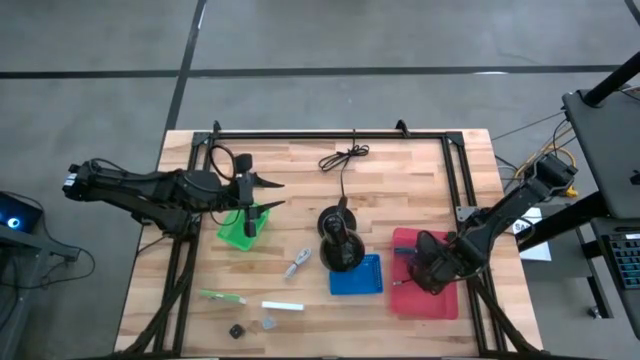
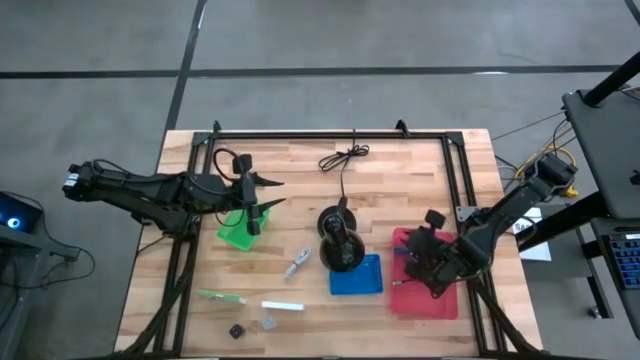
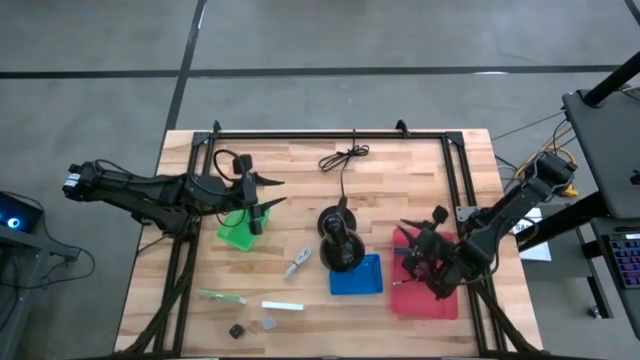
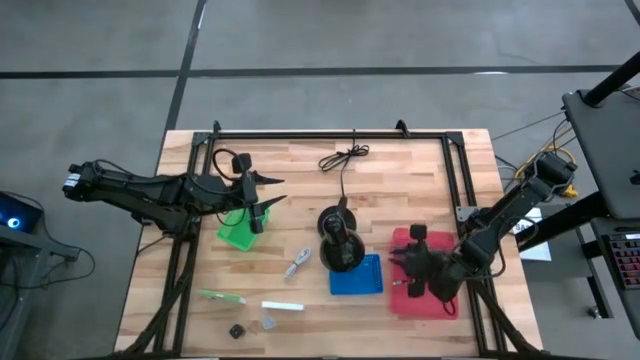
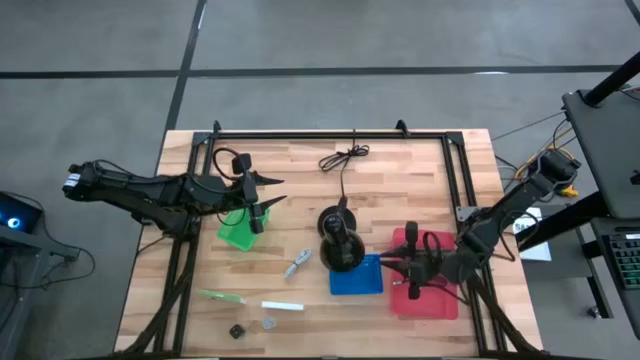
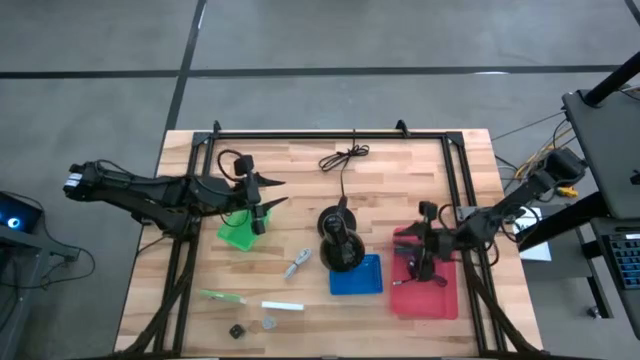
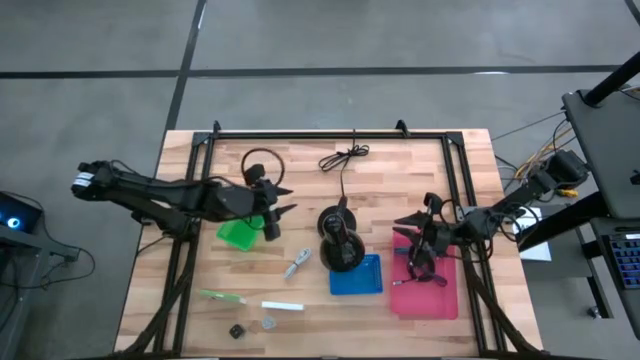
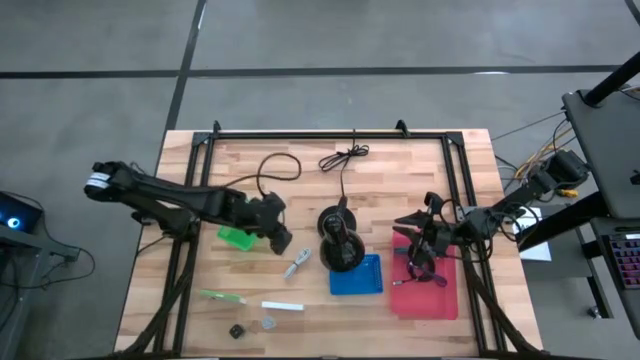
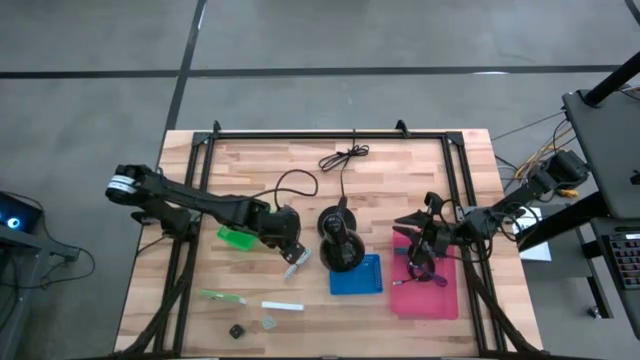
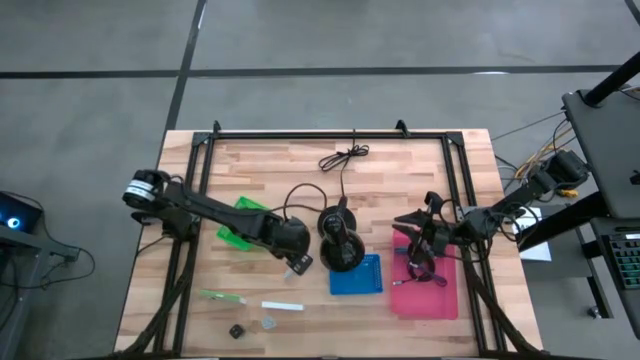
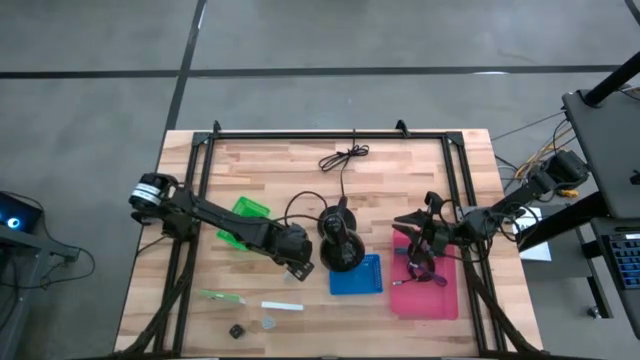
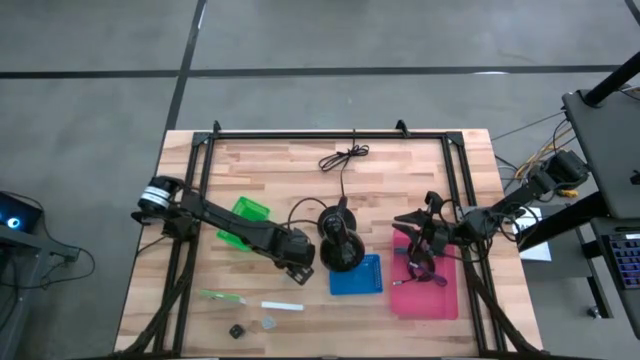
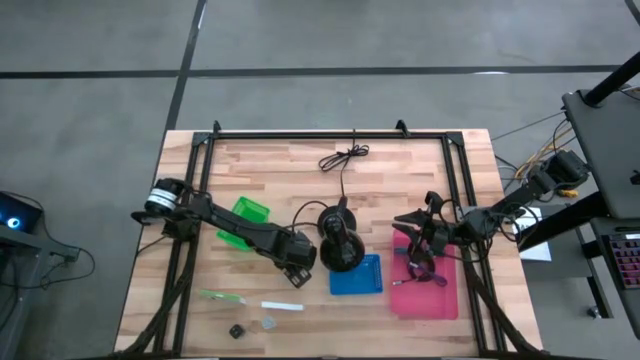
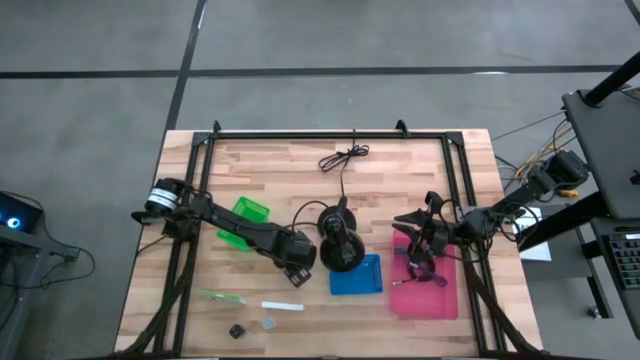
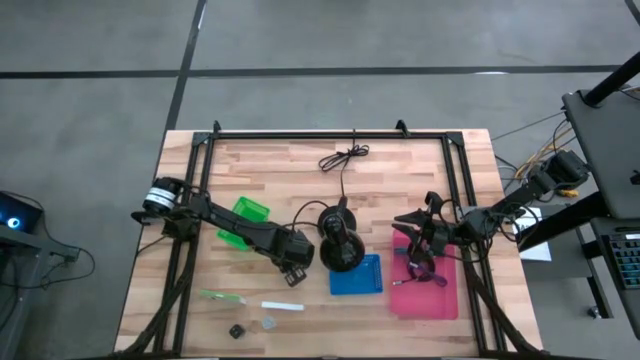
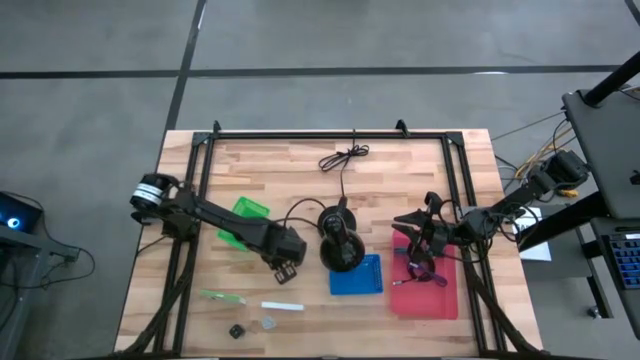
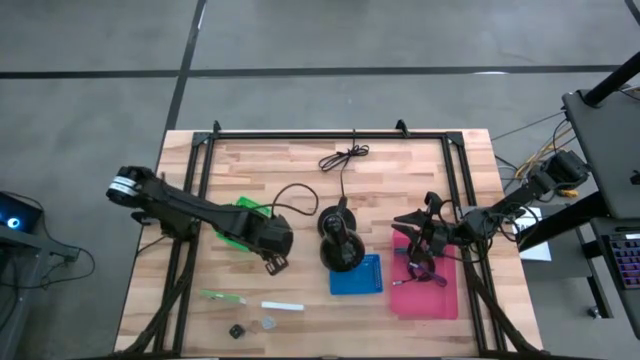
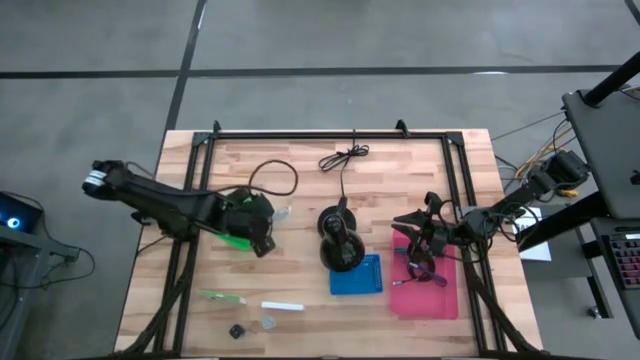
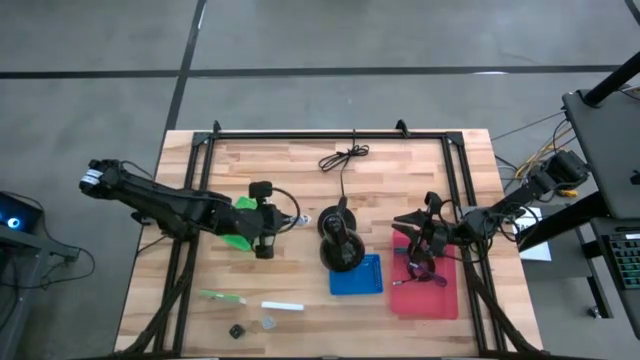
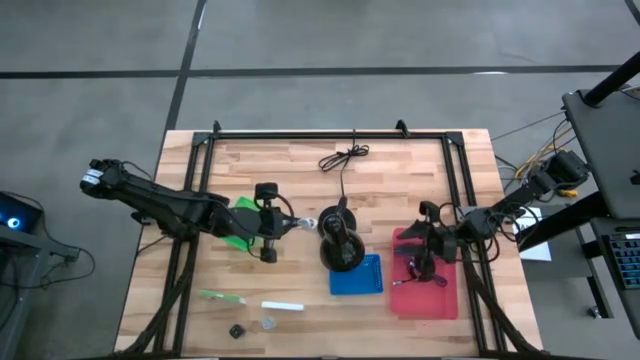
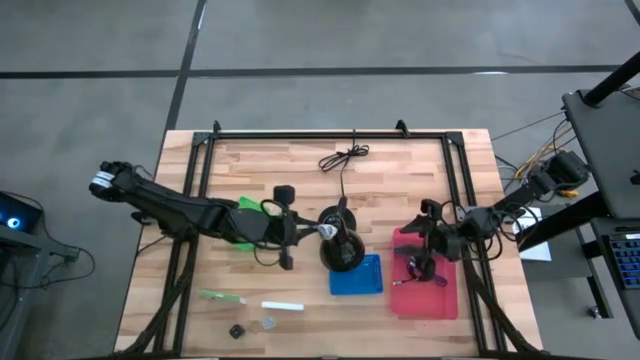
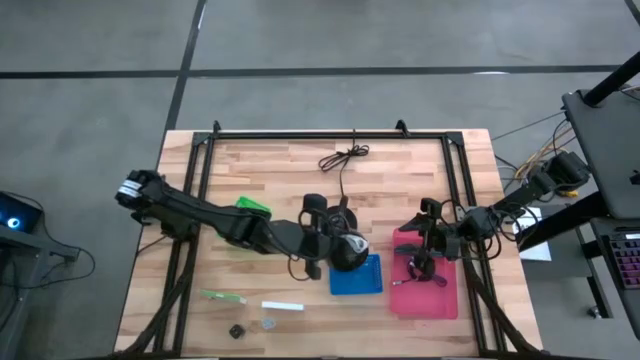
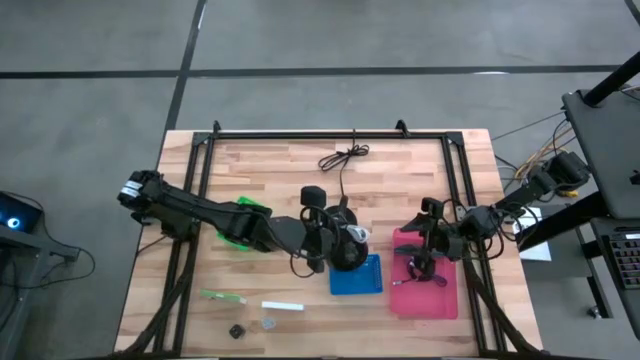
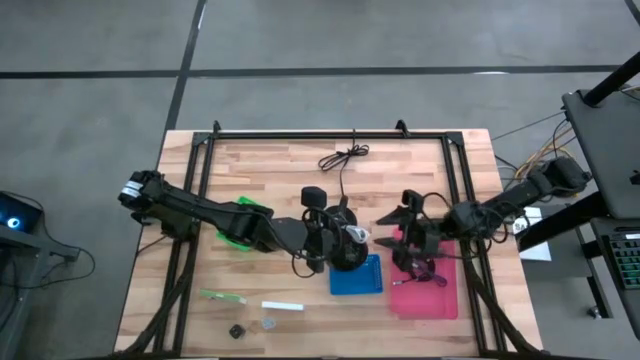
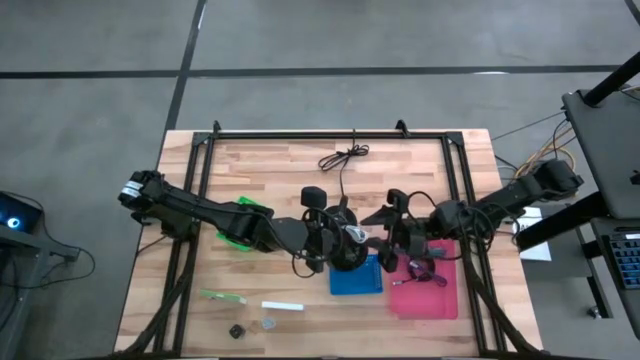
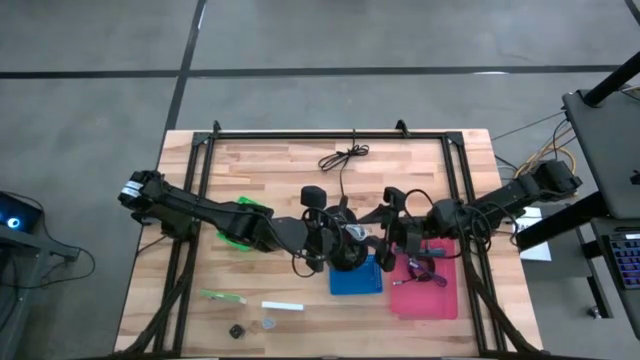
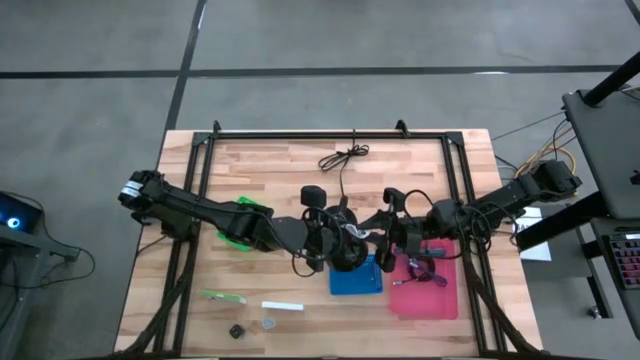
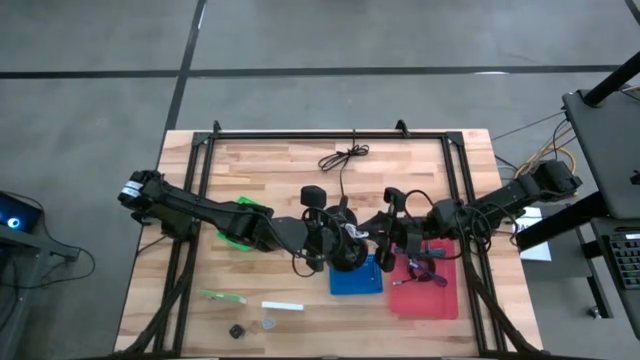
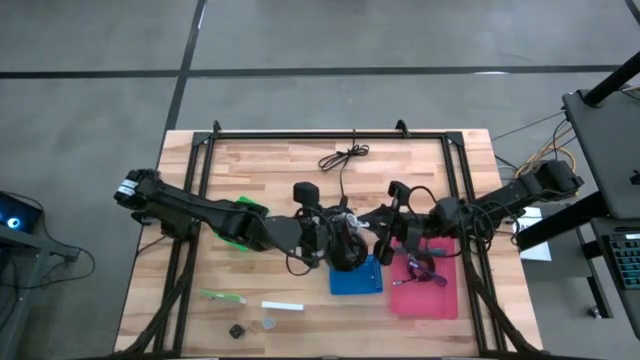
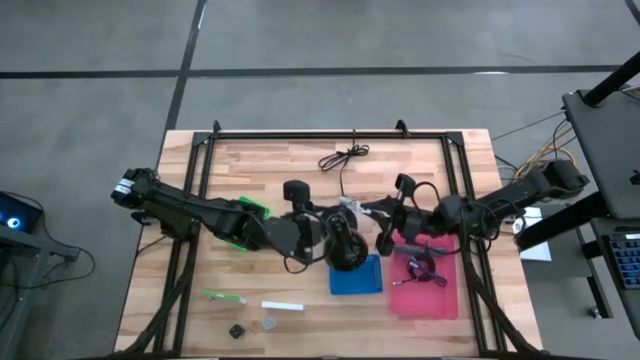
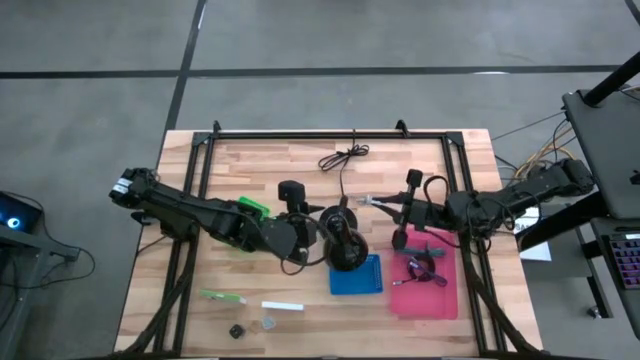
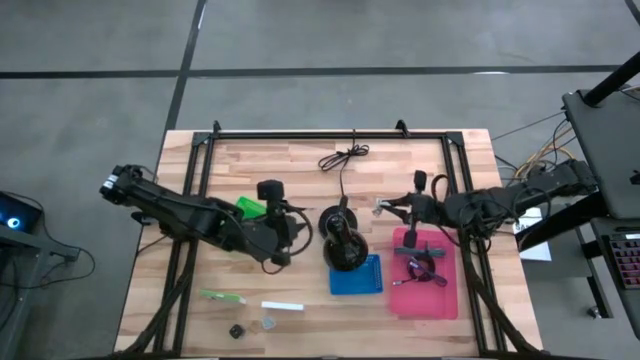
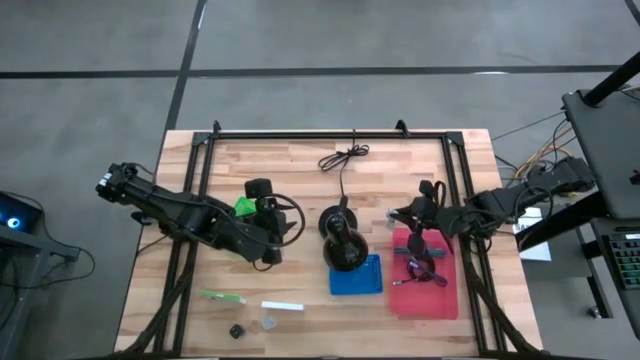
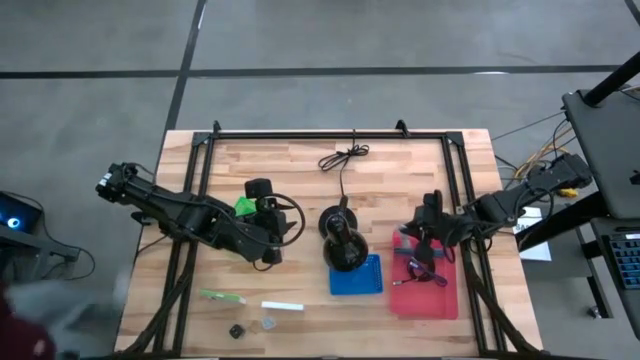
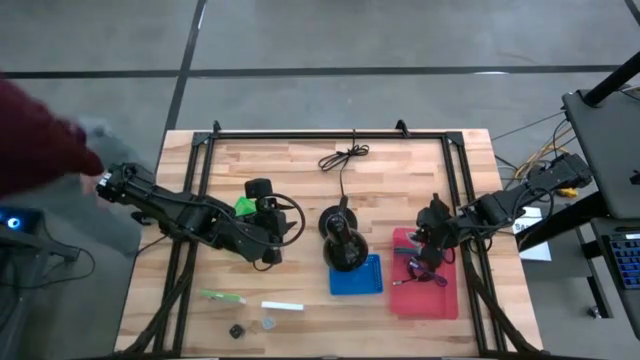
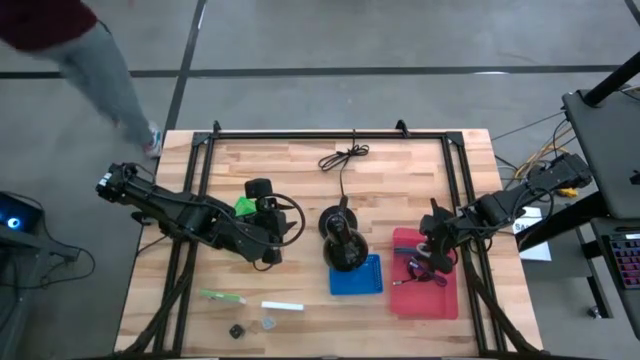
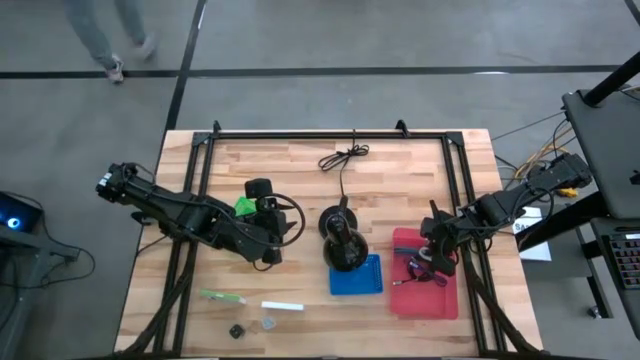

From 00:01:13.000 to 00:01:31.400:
Task: Pick and place items into bin
Put the white charger cable into the pink bin

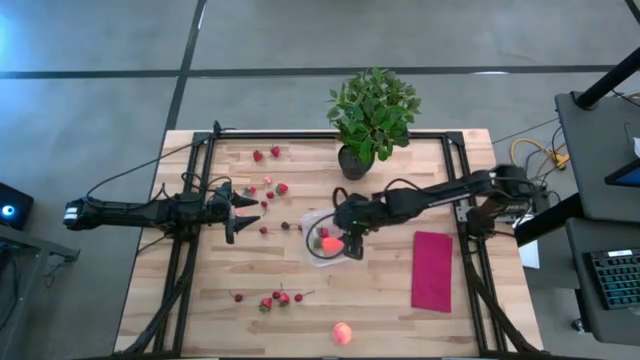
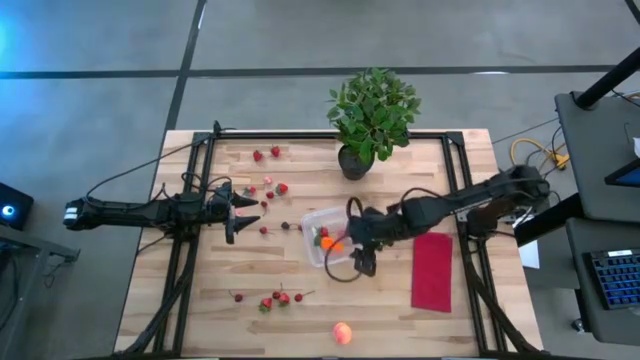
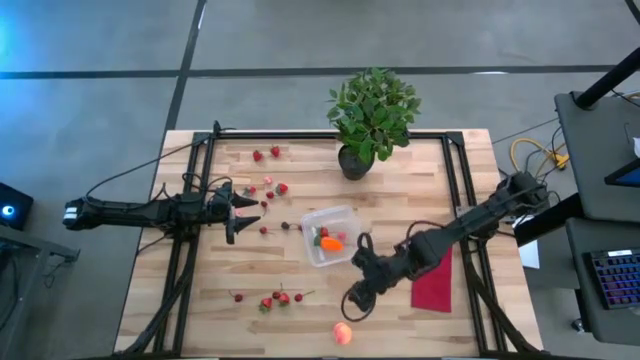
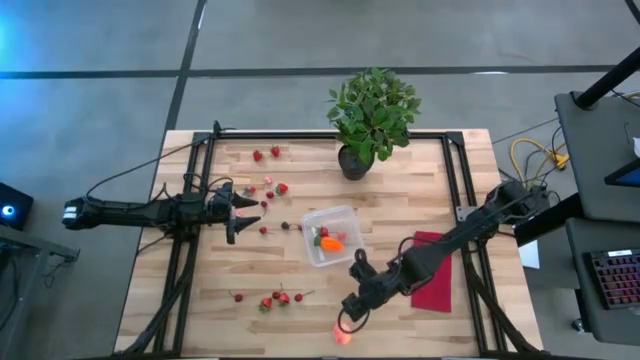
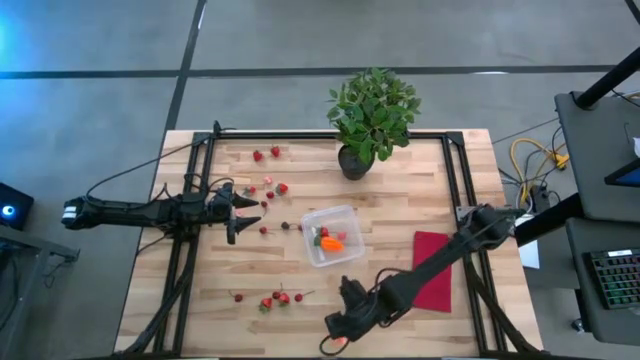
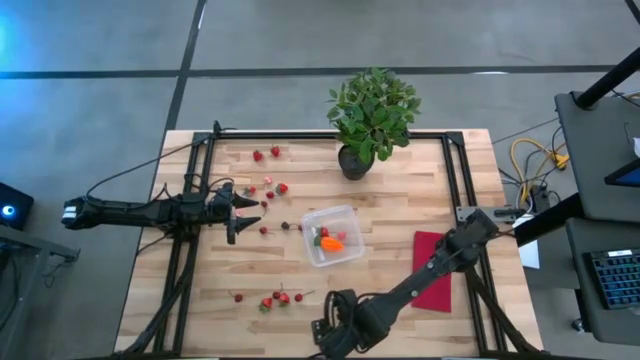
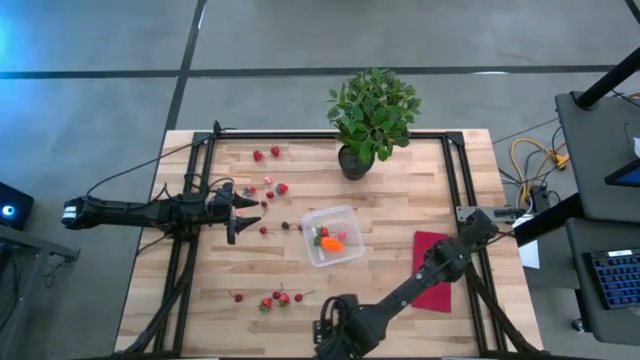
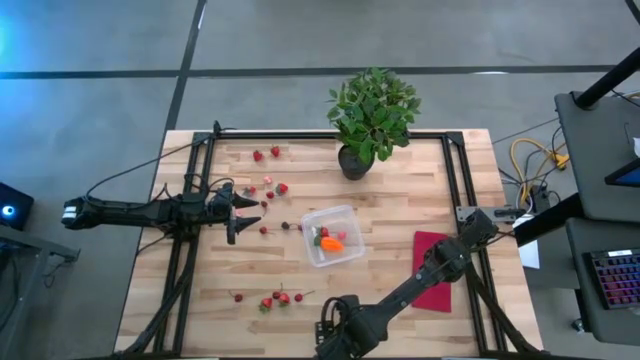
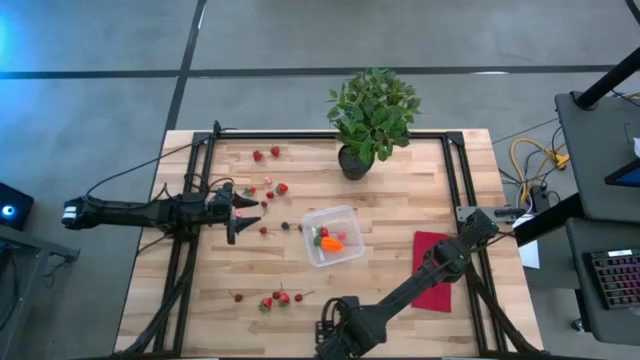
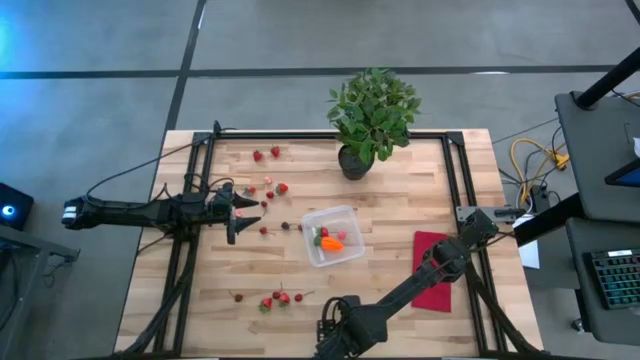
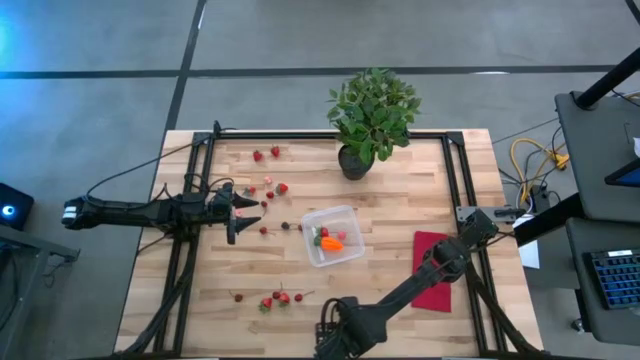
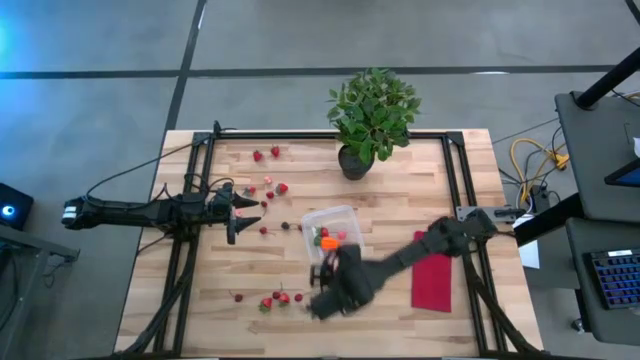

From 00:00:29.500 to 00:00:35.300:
Task: Pick and placing Produce into tupperware
Put the light pink peach into the transparent bin
